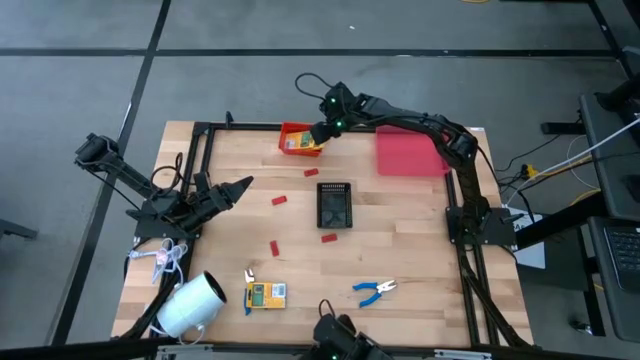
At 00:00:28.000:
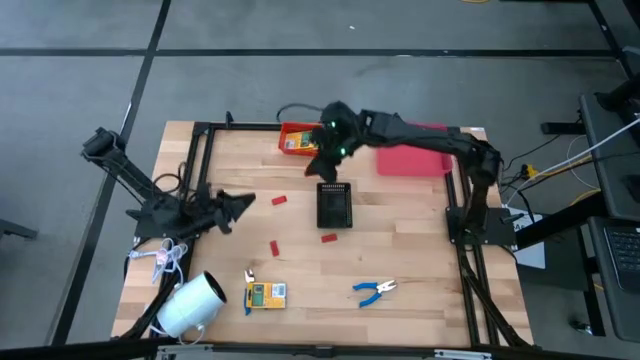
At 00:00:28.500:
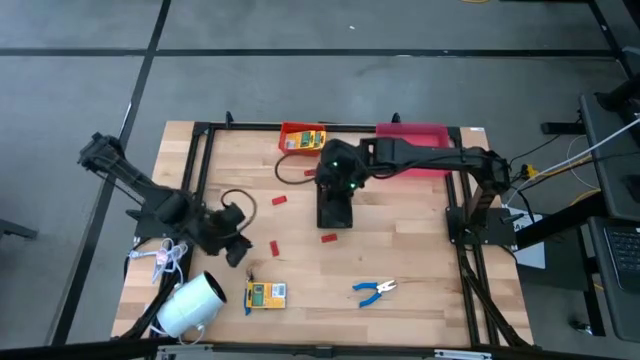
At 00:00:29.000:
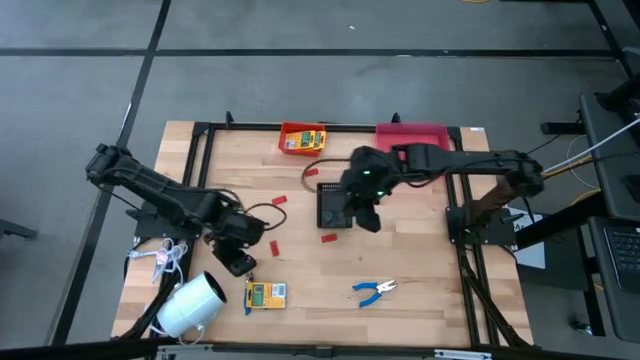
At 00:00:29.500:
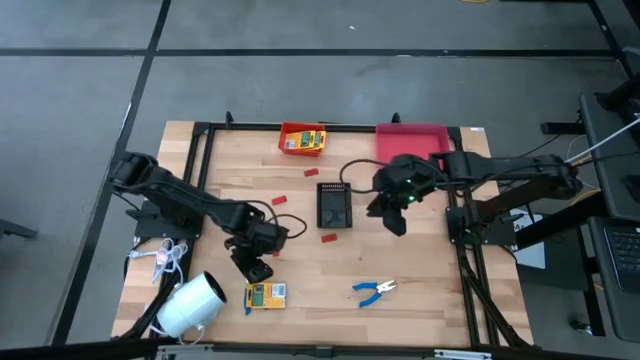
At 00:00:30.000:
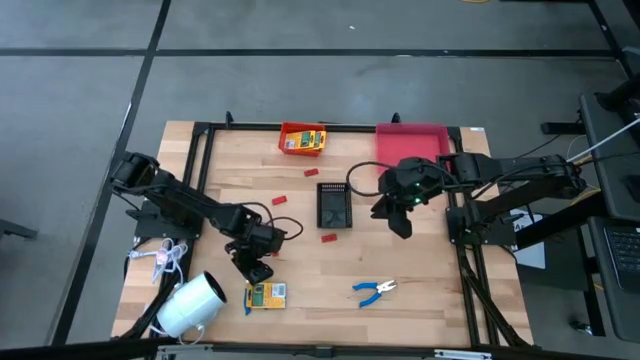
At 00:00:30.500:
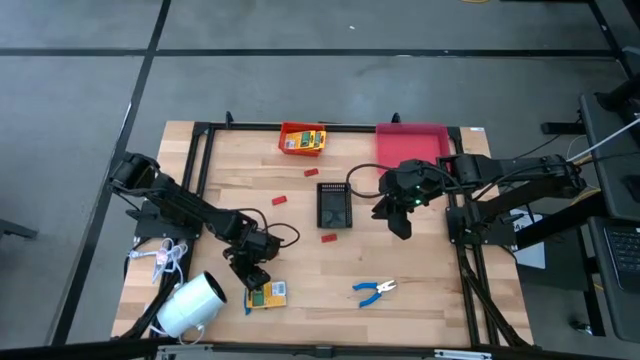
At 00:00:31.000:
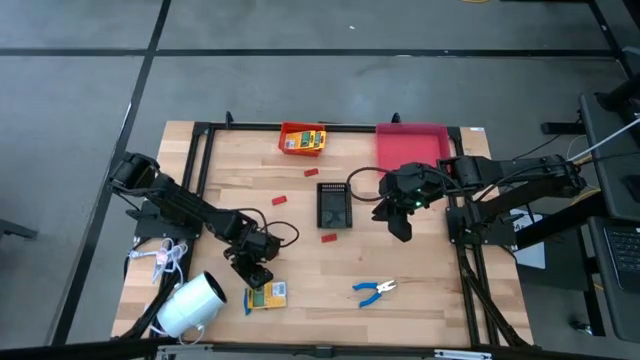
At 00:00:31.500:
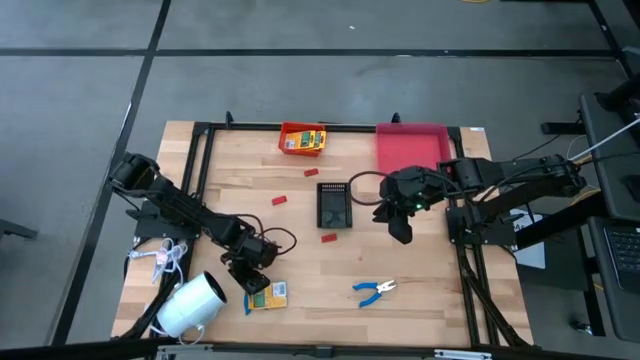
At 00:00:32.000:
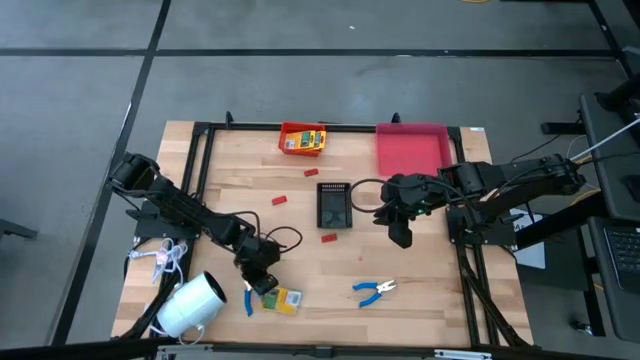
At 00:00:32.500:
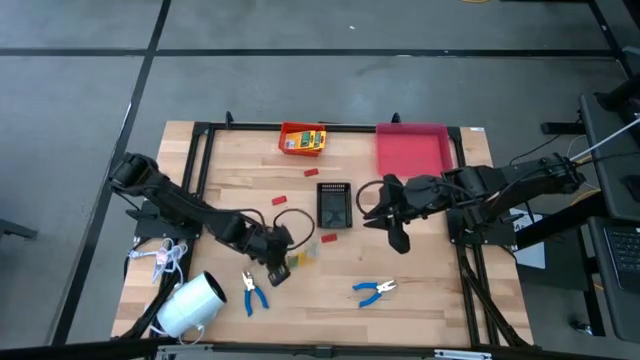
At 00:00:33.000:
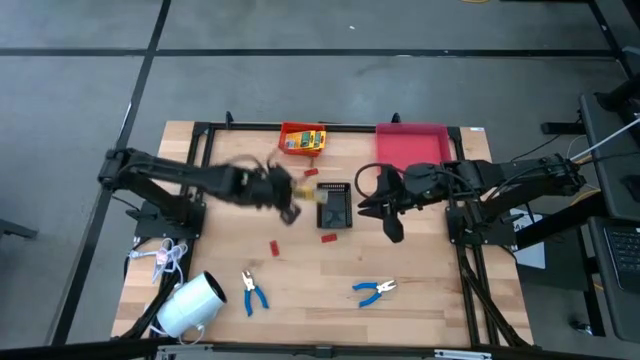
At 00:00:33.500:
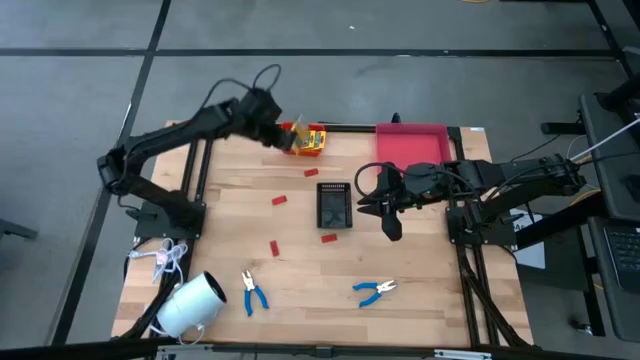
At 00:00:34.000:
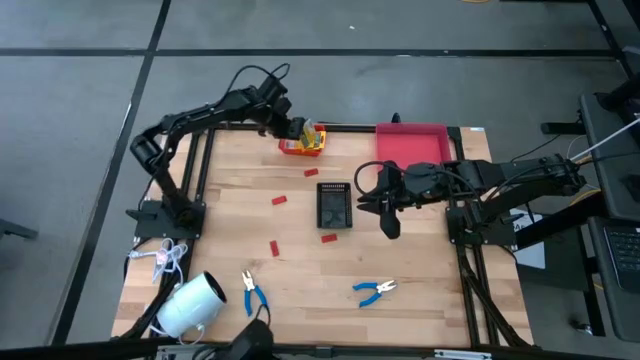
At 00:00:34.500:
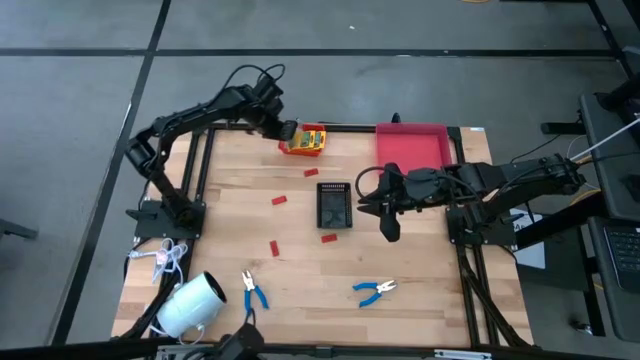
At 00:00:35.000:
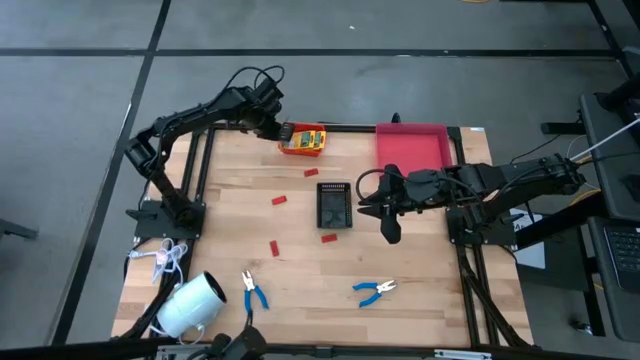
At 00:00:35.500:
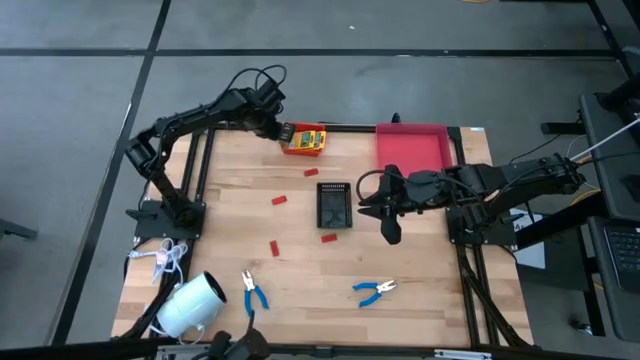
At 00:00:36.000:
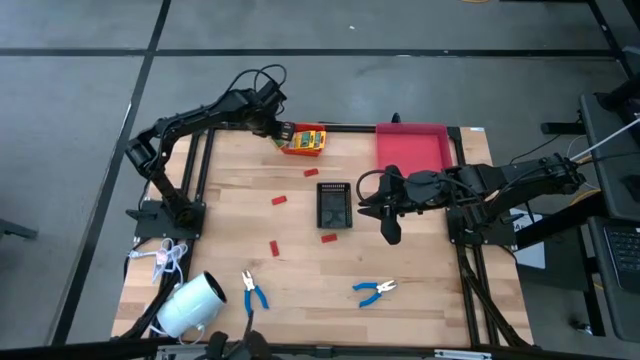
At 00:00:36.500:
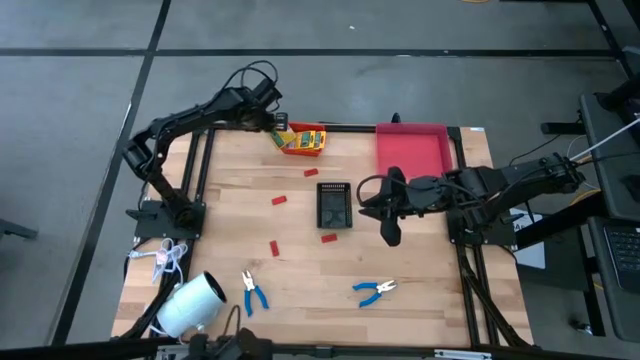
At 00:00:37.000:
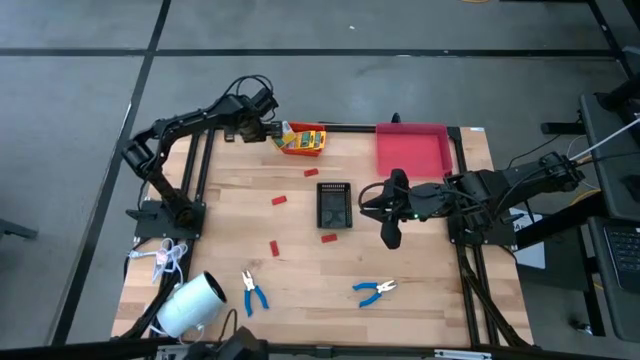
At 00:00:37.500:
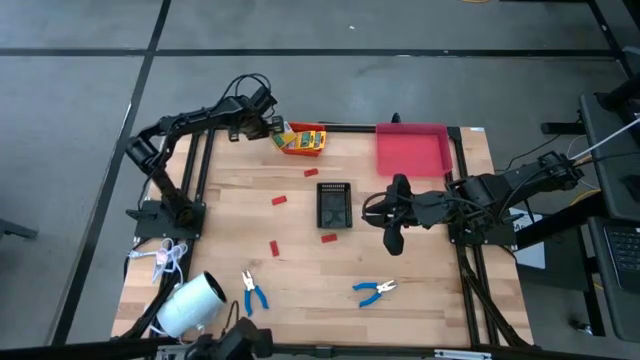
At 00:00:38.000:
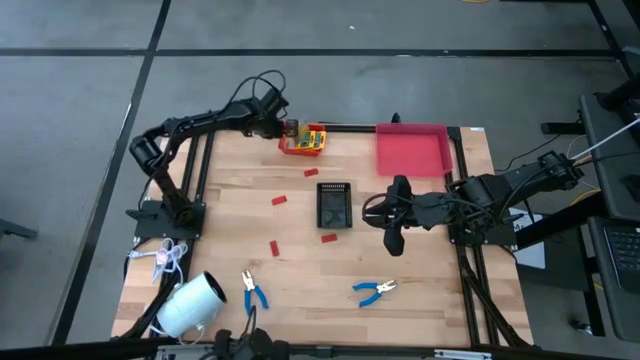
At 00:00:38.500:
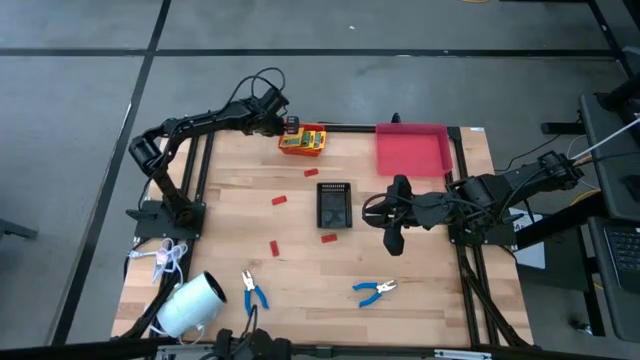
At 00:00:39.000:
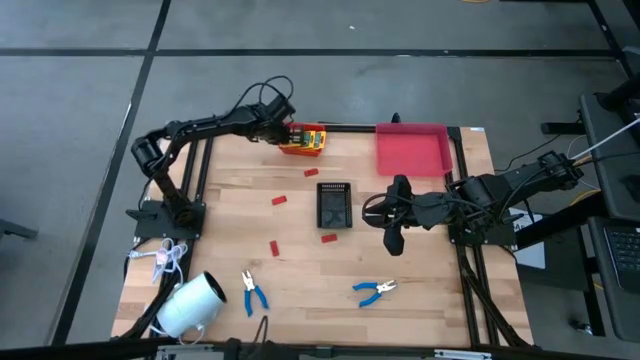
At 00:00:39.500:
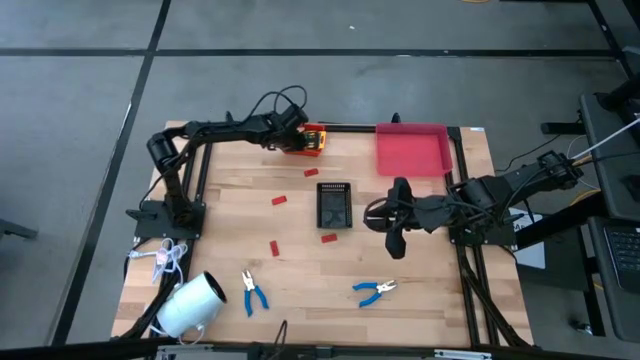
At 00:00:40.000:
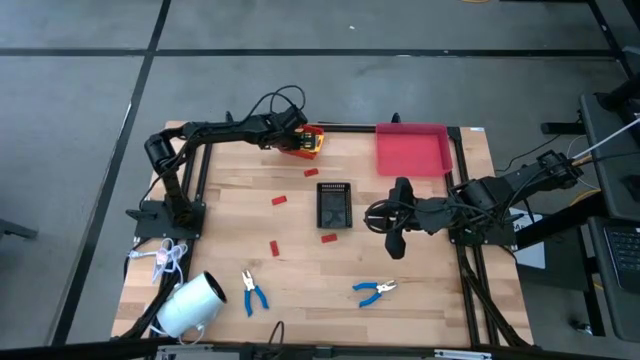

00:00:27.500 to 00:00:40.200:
Task: Pick & Place School Supplies
Put the yellow crayon box into the red bin

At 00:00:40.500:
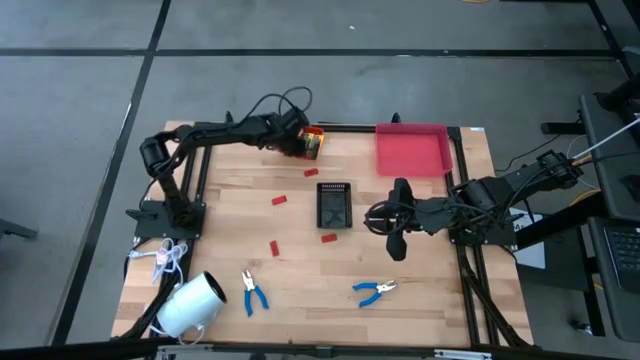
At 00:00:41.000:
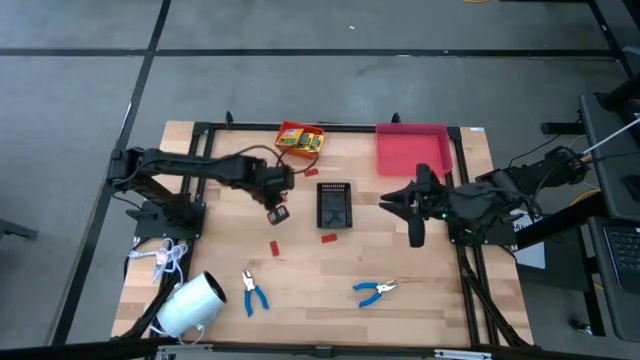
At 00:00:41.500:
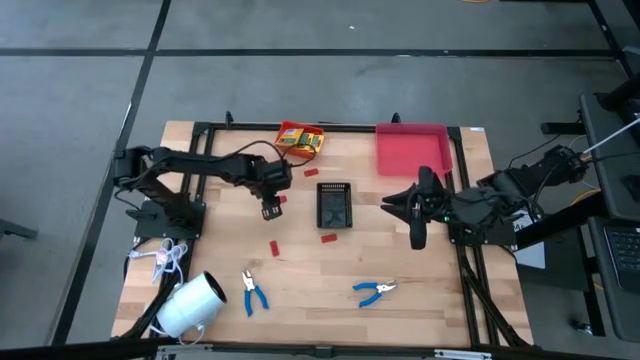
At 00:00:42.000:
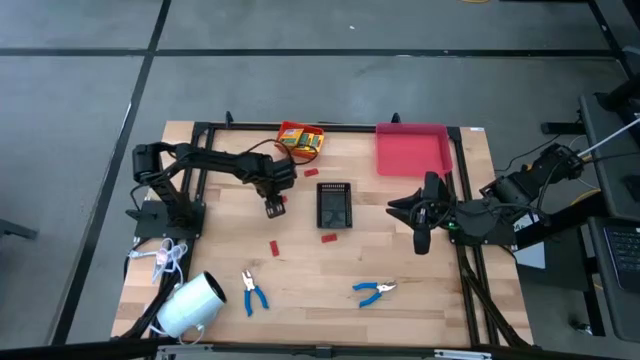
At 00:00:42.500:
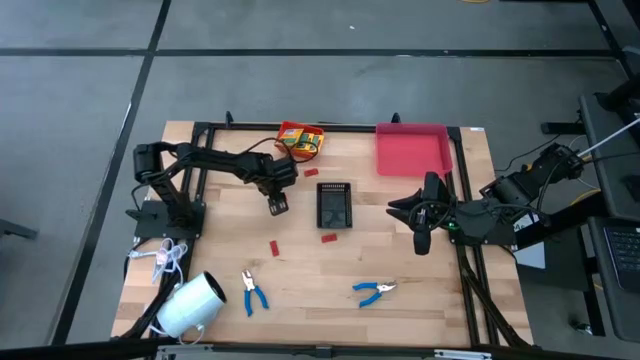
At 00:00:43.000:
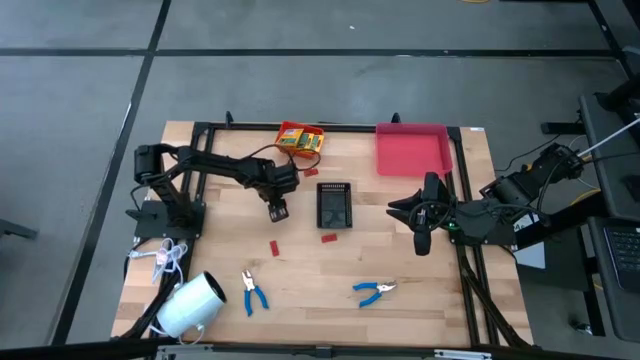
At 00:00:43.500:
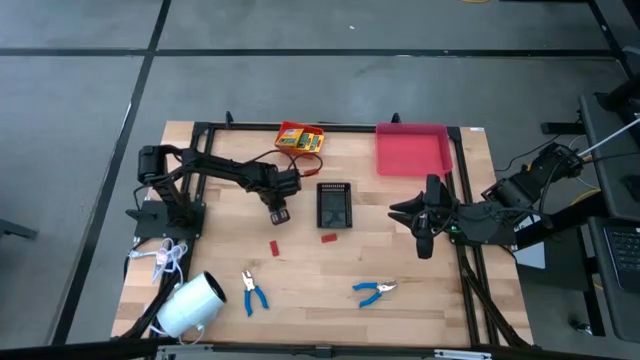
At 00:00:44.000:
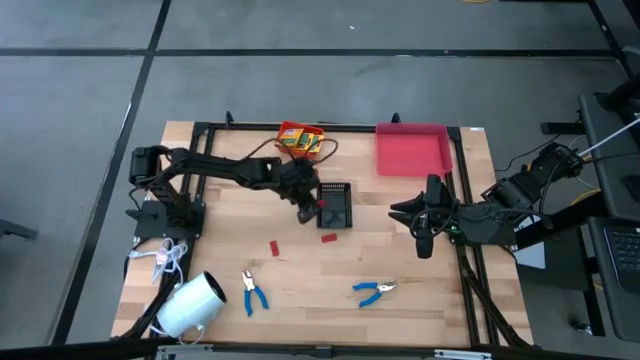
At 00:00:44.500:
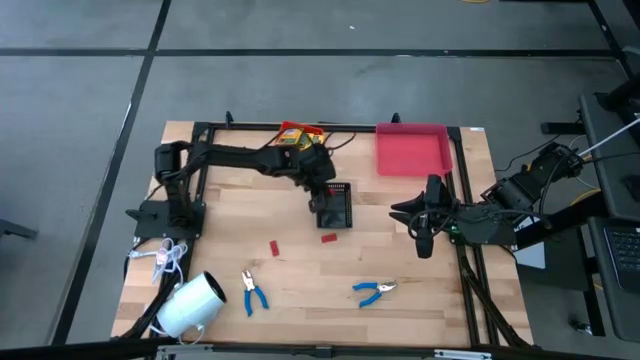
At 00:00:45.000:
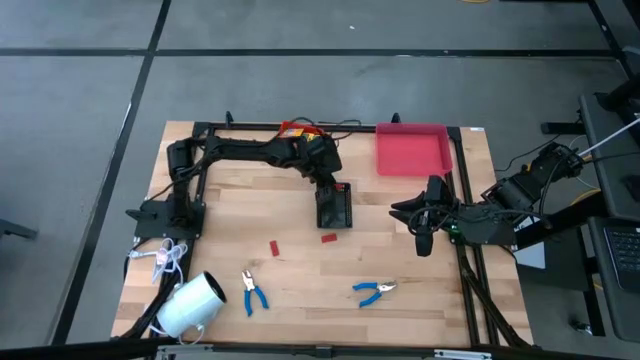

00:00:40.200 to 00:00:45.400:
Put the red eraser into the black bin

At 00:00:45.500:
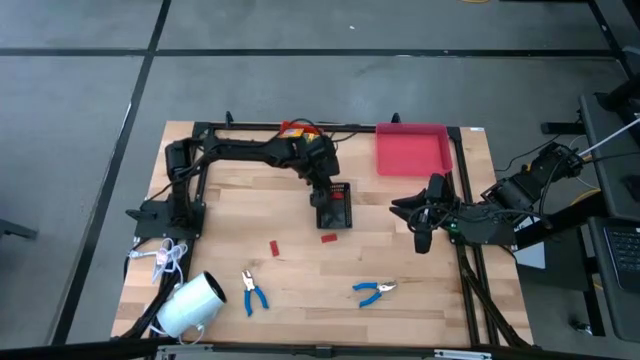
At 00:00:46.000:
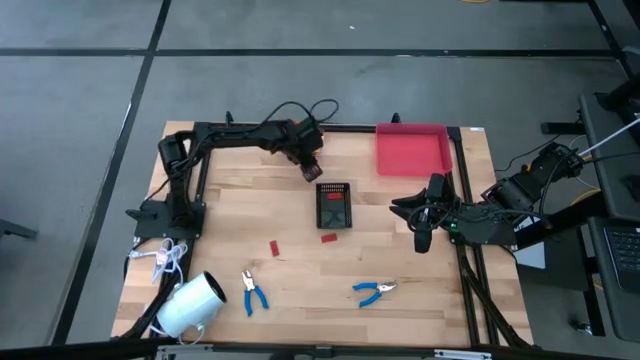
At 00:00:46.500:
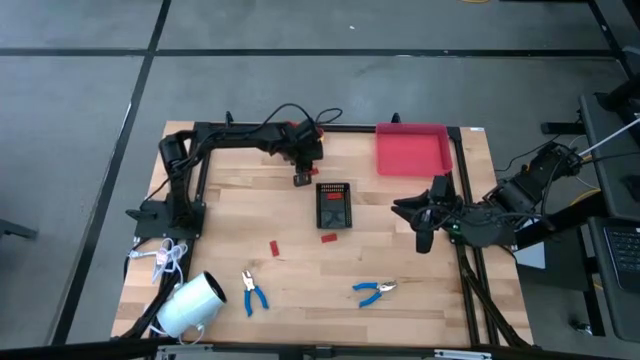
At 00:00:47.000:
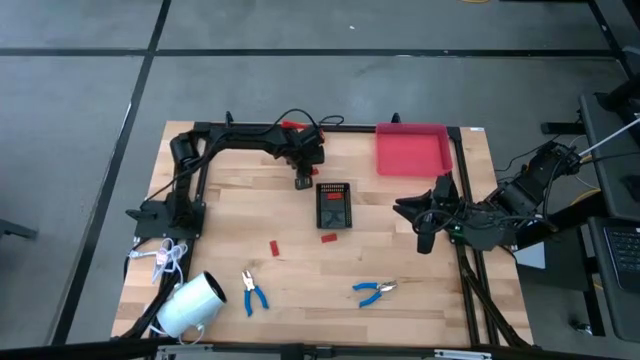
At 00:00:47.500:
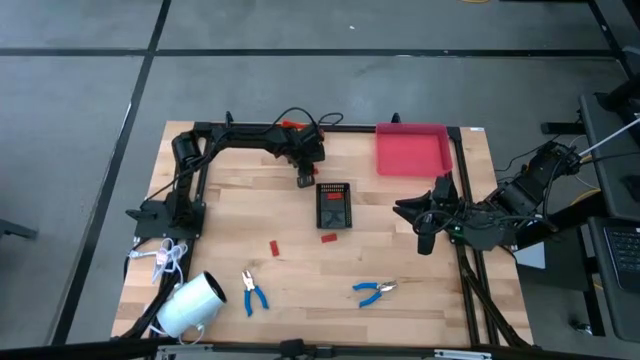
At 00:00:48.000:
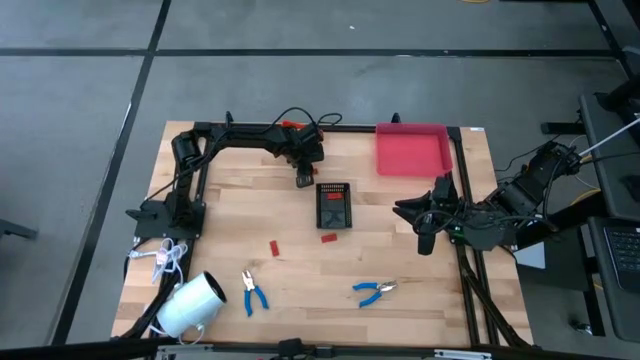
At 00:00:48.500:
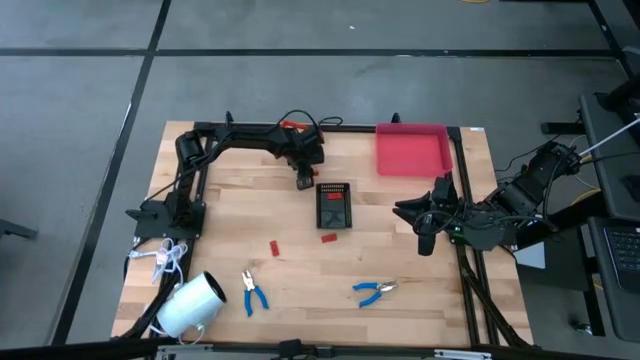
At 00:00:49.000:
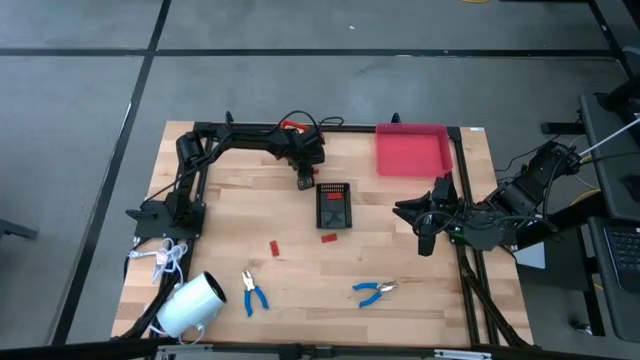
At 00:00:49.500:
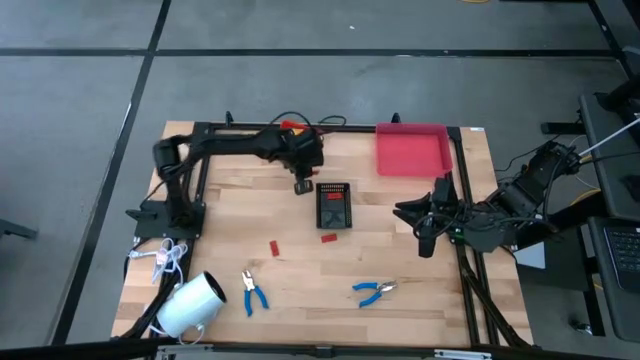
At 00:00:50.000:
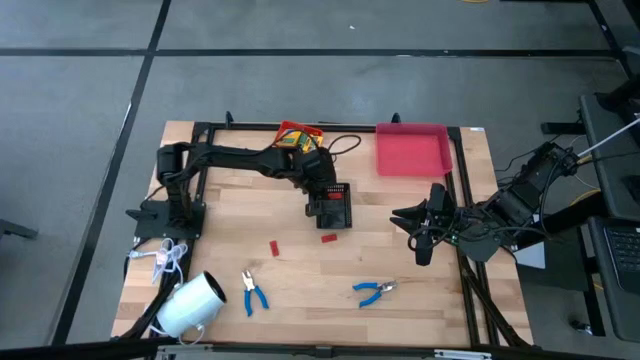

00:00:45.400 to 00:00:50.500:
Put the red eraser into the black bin
